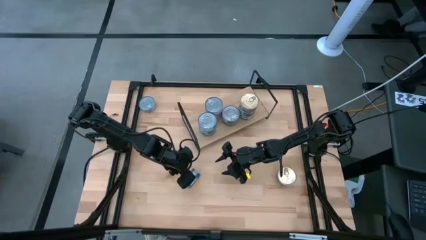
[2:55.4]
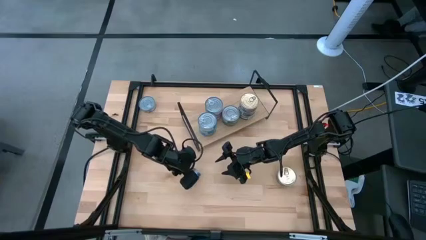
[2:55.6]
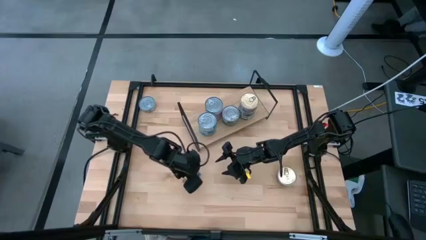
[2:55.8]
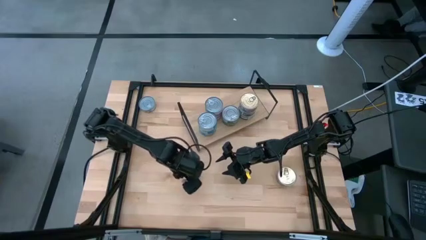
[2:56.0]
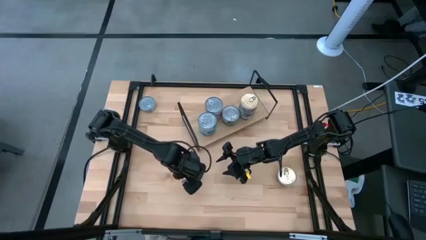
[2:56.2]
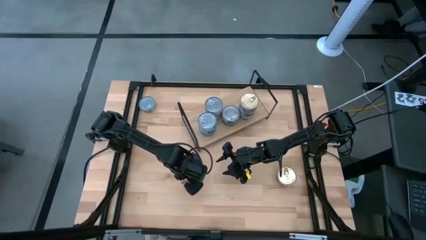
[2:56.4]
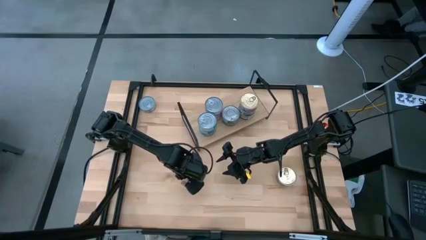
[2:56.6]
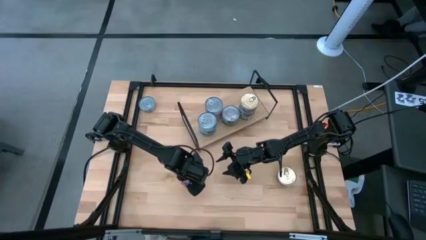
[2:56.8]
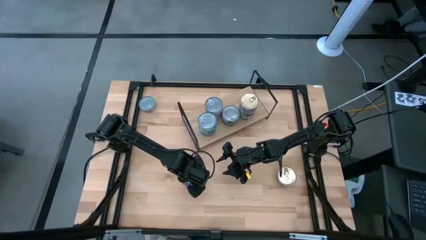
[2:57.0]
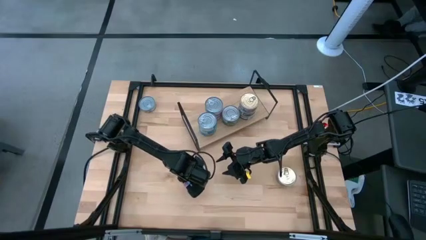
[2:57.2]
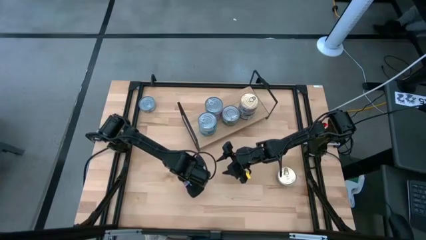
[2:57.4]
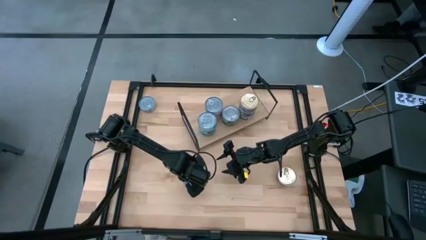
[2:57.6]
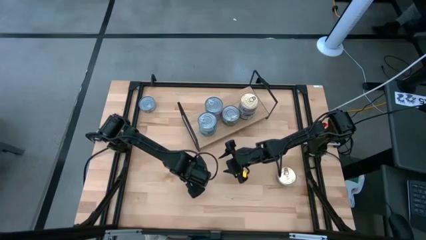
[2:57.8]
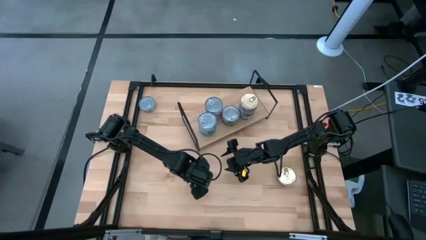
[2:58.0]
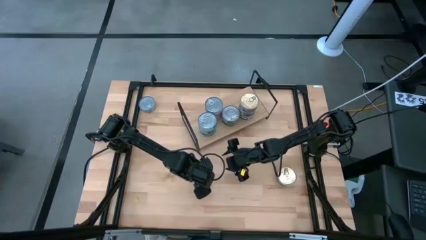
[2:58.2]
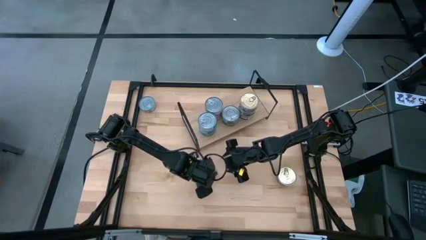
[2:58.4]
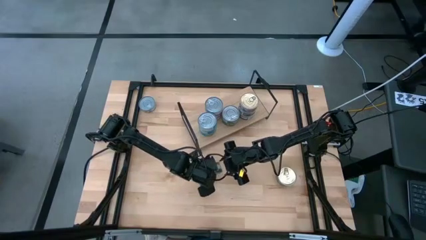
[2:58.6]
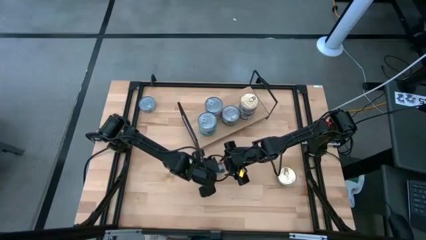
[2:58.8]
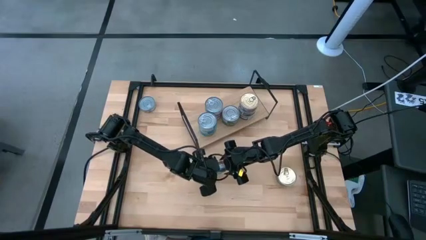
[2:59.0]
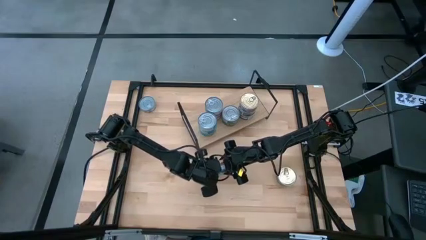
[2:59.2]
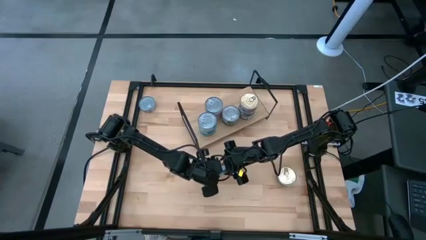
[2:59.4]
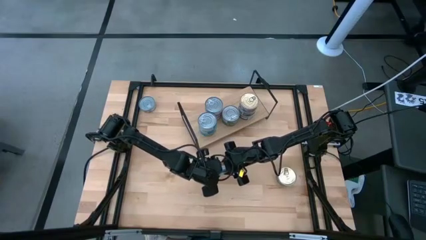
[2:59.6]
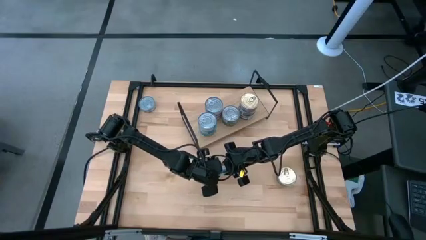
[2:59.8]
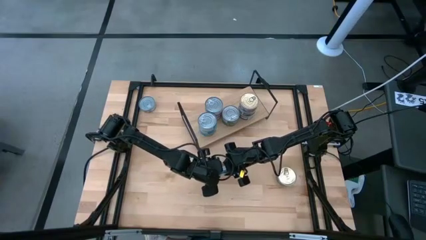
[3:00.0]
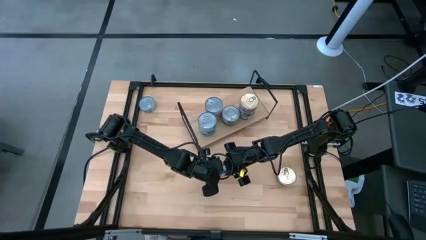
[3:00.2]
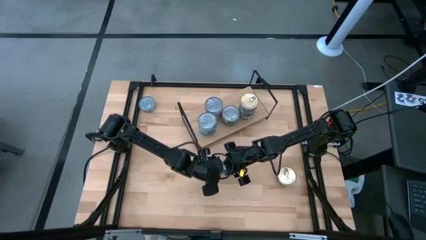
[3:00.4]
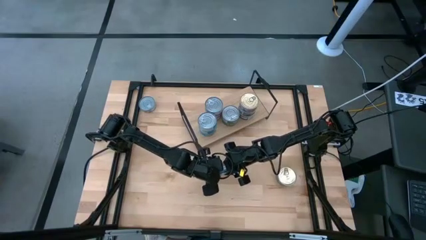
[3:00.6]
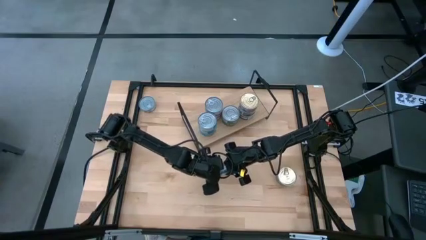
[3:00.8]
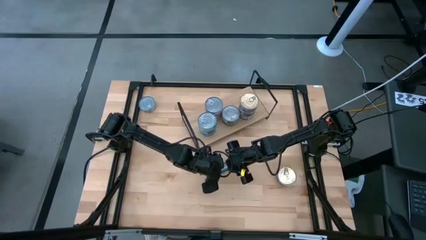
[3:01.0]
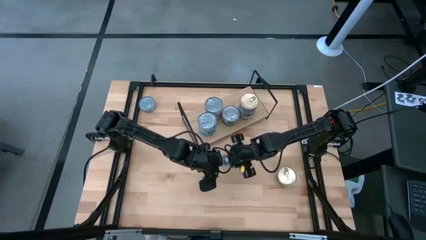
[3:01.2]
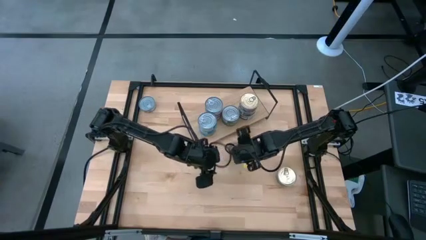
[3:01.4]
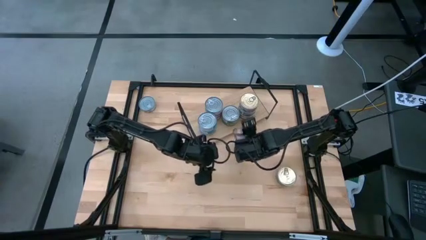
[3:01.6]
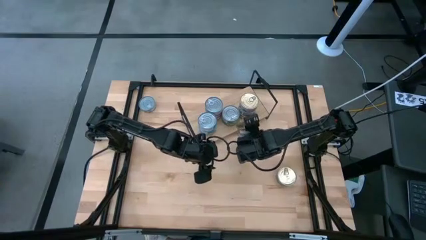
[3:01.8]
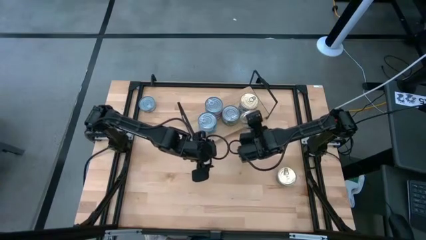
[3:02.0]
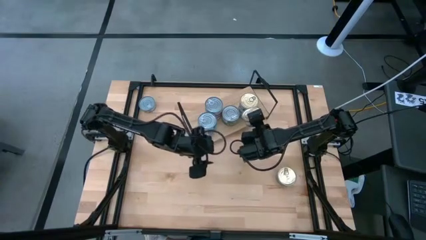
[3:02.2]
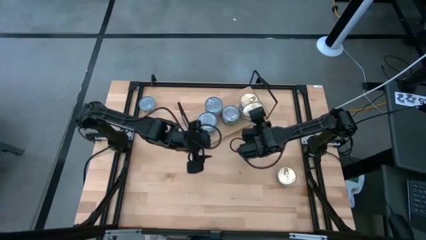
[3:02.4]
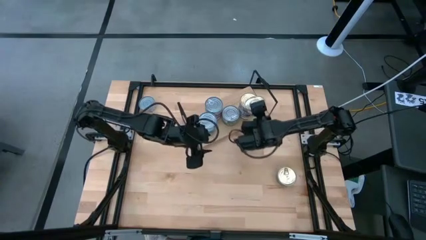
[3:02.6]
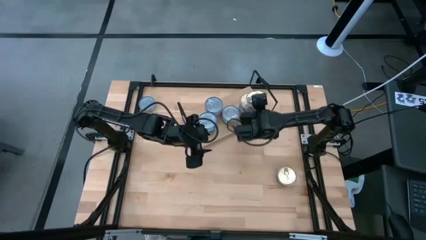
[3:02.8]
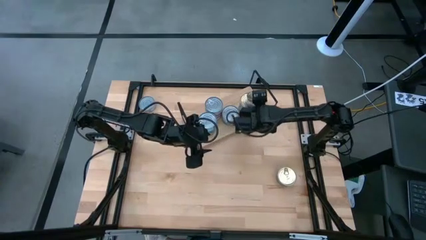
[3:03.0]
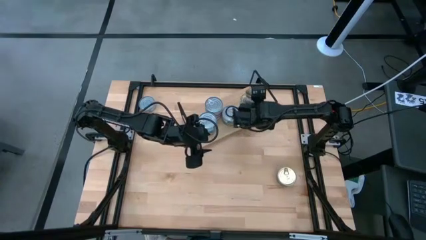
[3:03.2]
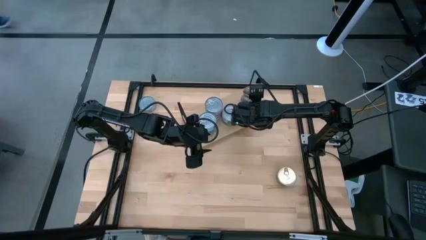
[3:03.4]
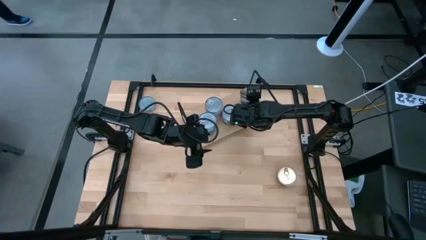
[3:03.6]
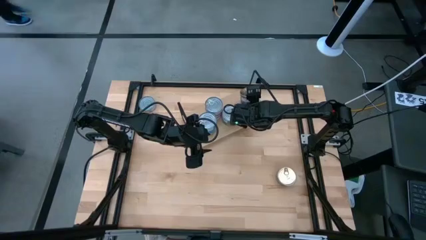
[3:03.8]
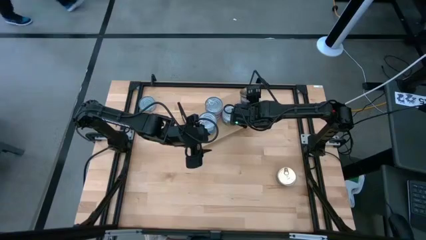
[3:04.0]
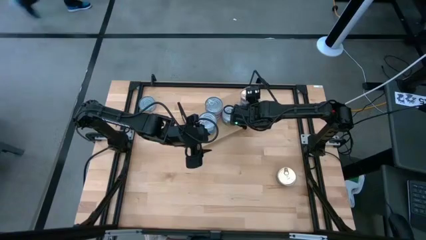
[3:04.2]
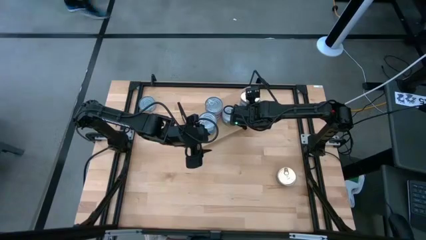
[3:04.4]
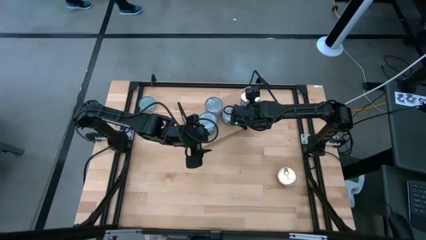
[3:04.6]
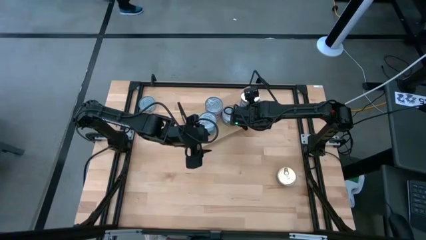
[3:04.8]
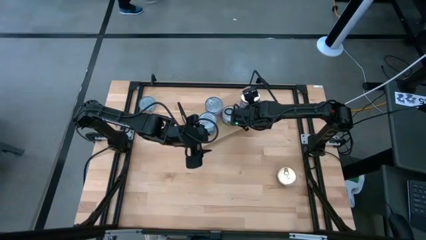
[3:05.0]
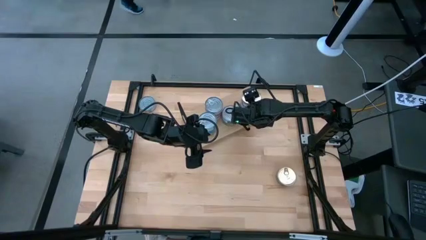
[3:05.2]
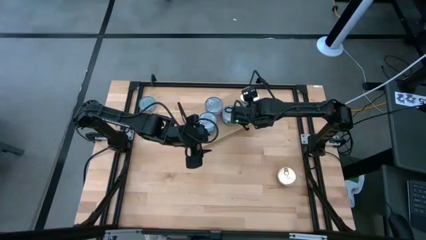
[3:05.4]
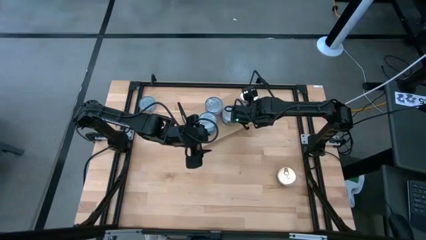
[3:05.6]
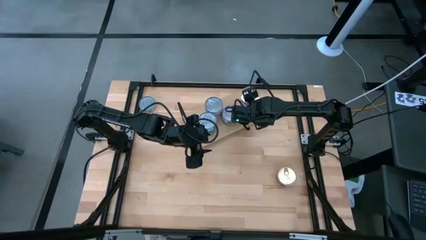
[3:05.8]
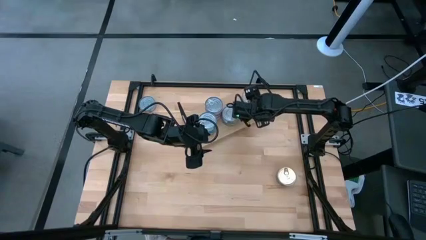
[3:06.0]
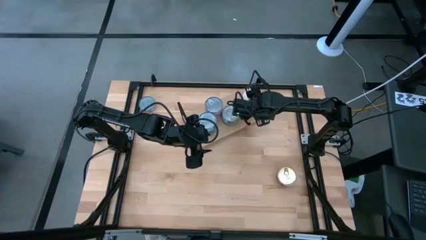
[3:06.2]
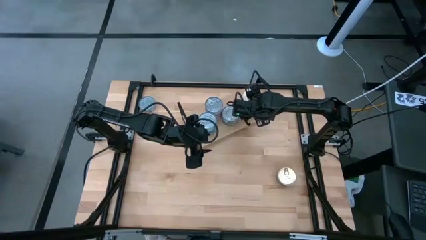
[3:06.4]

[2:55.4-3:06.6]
Task: Stack canned seafood by type on shelf
Stack the blue and pink tuna can on the shelf on top of the other blue and pink tuna can

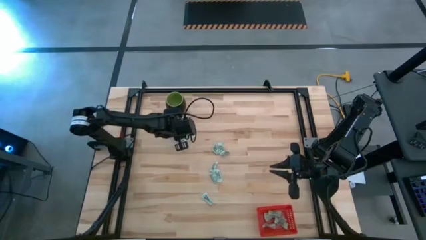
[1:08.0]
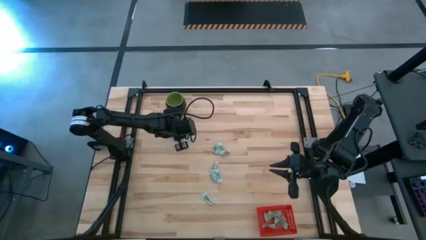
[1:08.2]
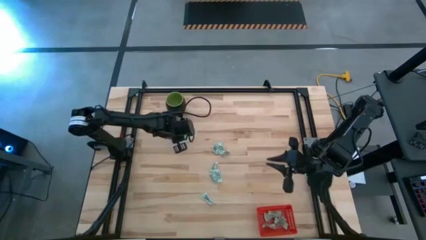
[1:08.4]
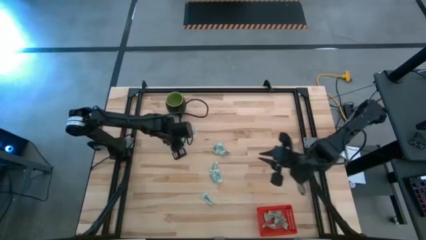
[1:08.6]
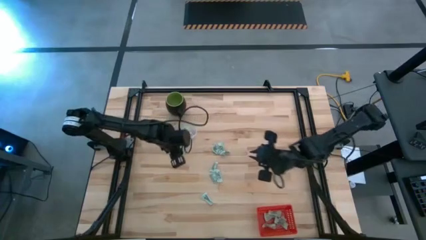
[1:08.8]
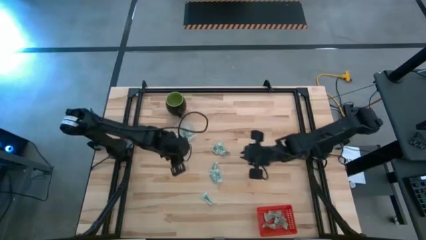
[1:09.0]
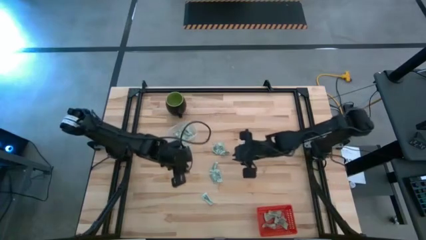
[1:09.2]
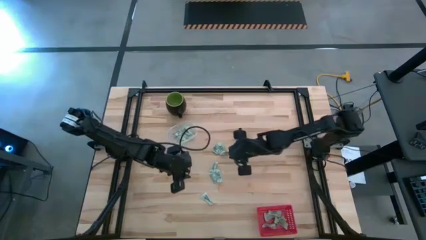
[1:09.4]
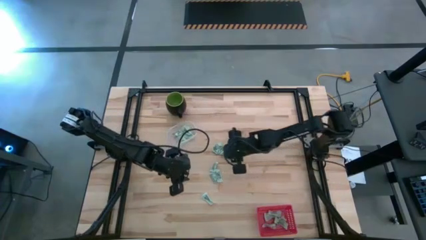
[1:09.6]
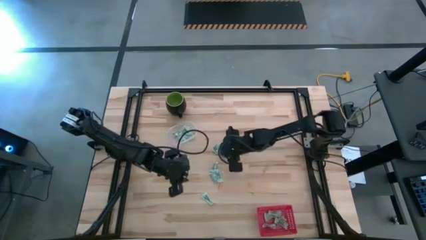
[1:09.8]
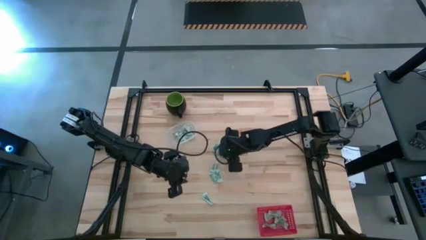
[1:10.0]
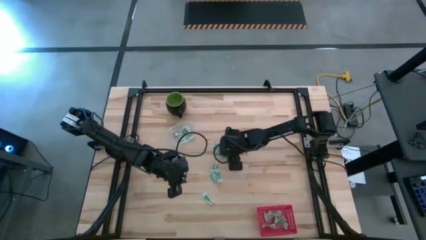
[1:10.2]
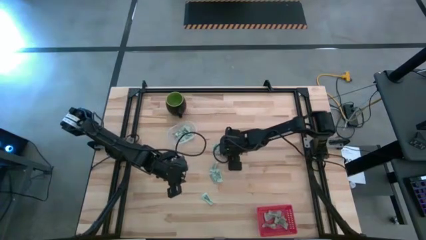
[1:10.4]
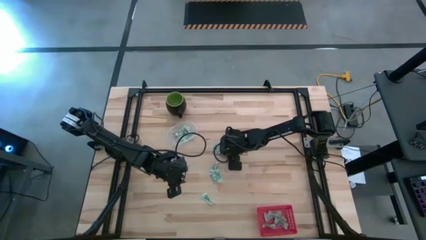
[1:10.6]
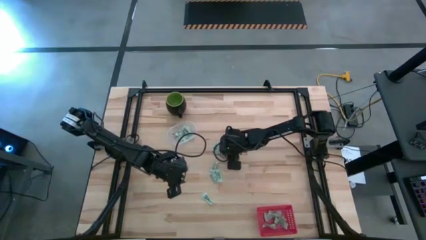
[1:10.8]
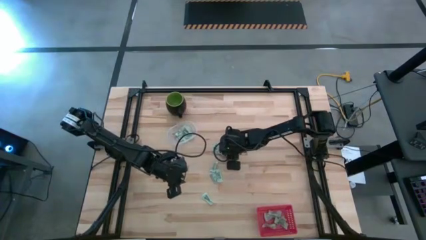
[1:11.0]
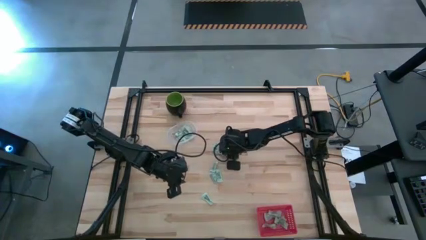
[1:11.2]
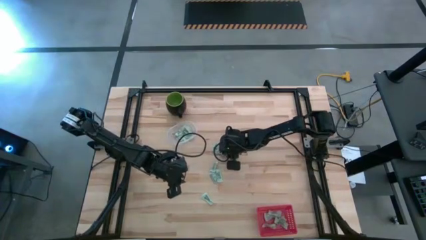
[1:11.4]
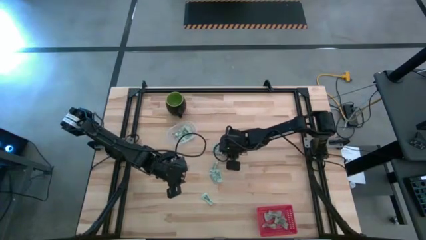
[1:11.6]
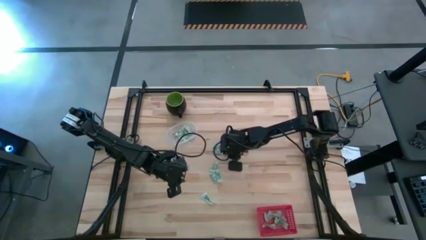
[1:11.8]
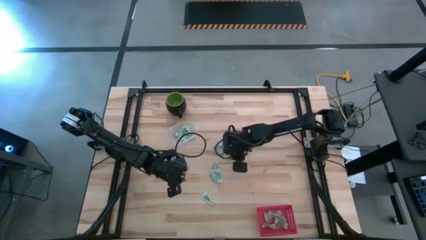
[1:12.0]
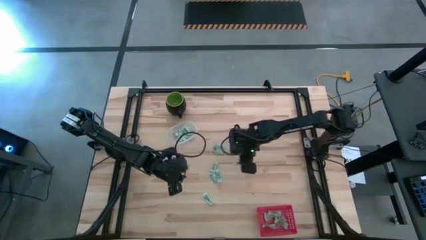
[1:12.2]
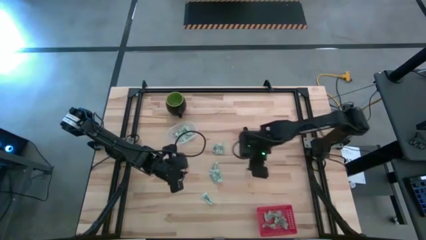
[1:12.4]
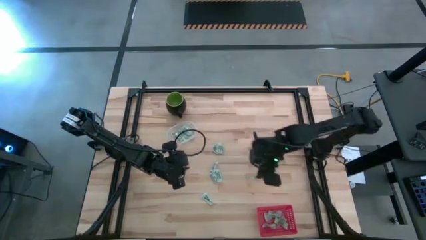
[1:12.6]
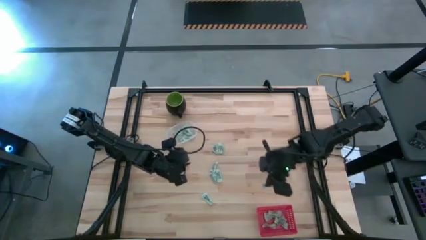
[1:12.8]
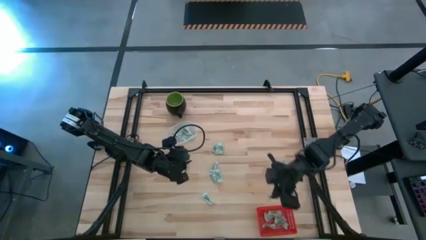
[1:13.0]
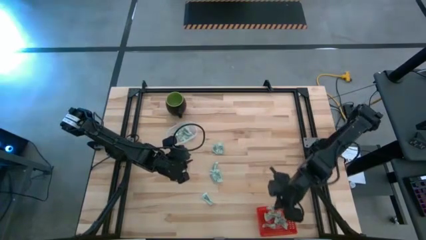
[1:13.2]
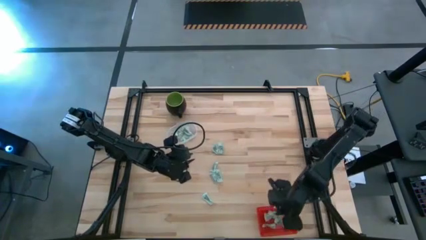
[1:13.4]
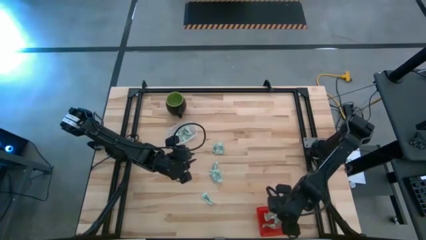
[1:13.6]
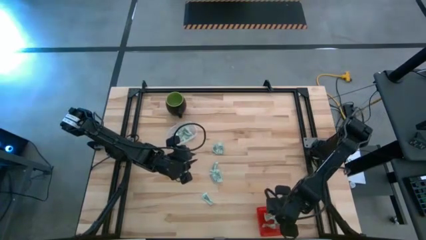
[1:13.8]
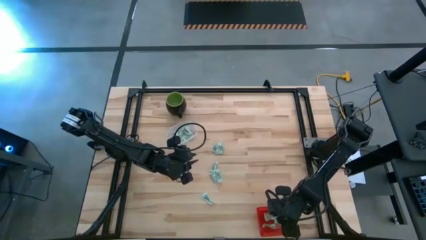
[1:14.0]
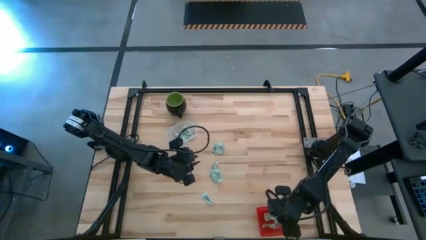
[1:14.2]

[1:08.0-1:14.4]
Task: Pick and place items into bin
Put the green stevia packet into the red basket
